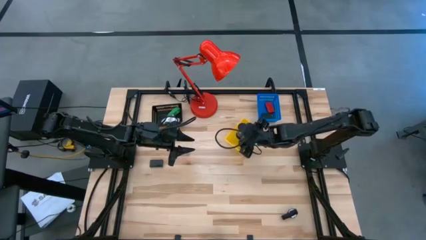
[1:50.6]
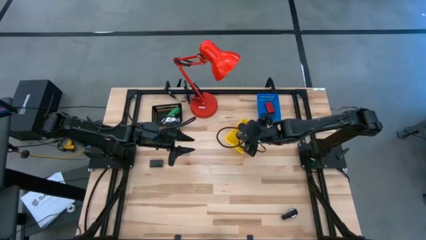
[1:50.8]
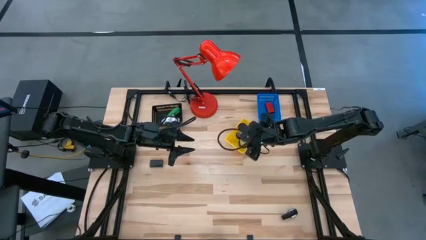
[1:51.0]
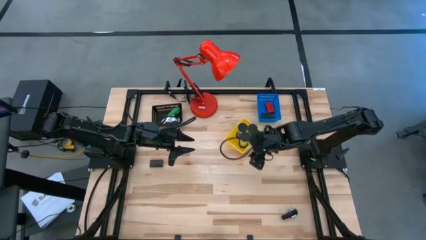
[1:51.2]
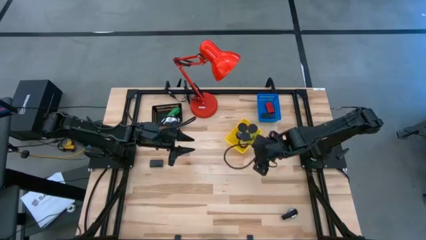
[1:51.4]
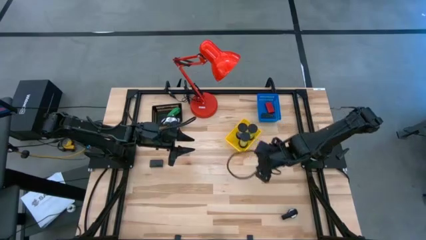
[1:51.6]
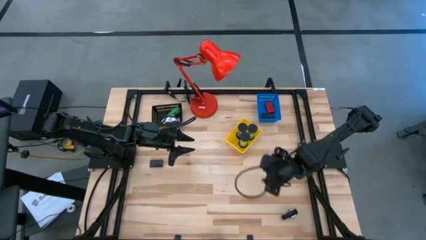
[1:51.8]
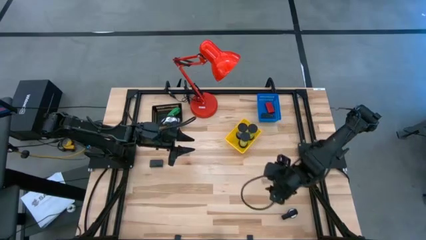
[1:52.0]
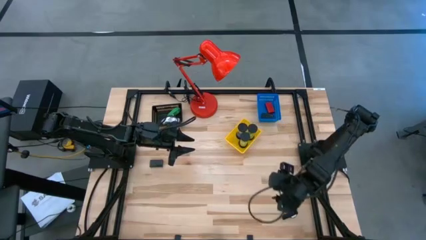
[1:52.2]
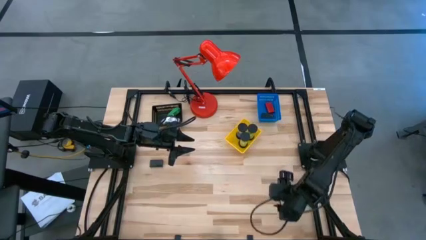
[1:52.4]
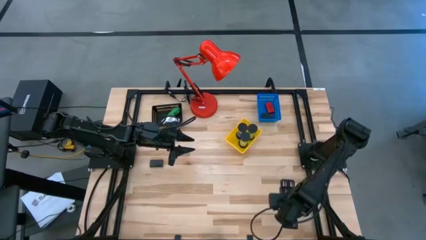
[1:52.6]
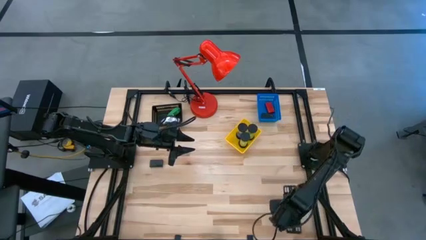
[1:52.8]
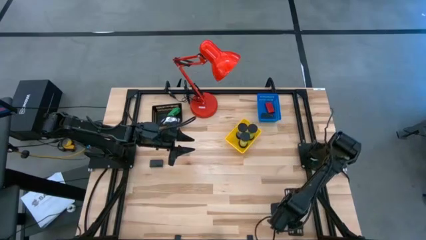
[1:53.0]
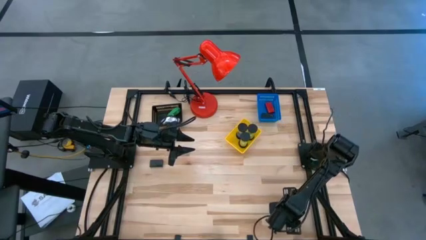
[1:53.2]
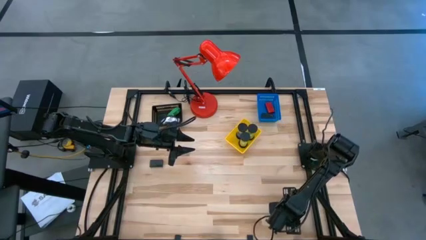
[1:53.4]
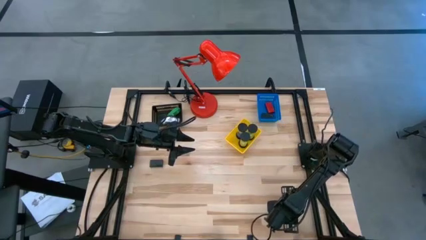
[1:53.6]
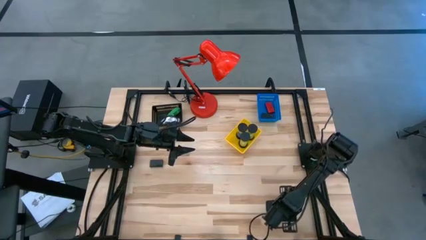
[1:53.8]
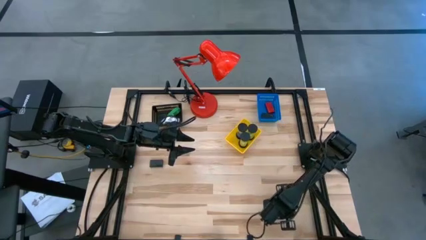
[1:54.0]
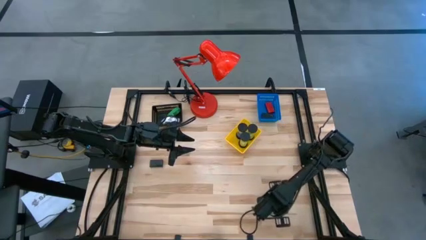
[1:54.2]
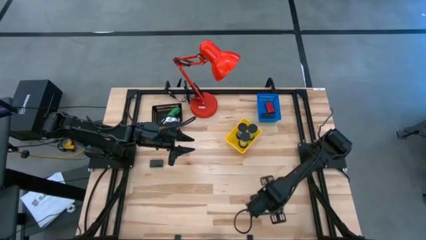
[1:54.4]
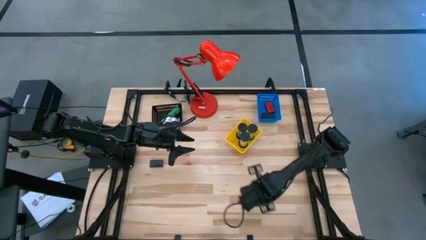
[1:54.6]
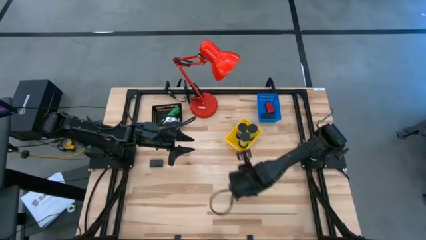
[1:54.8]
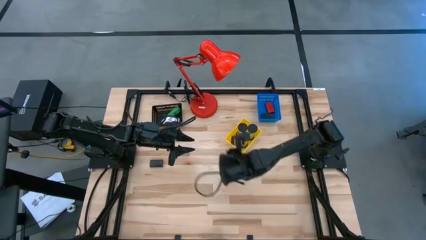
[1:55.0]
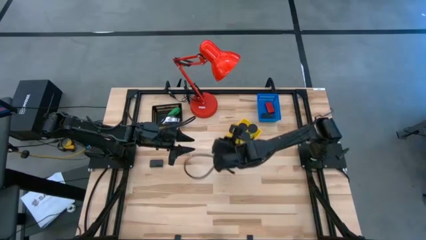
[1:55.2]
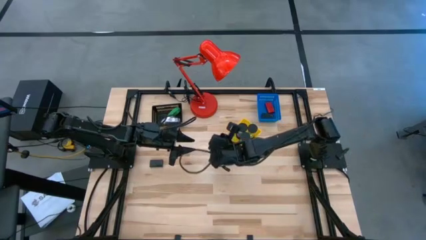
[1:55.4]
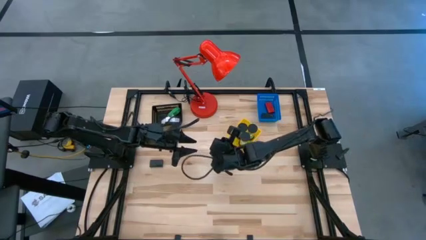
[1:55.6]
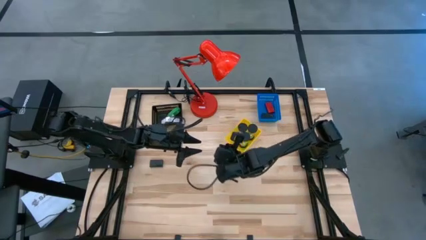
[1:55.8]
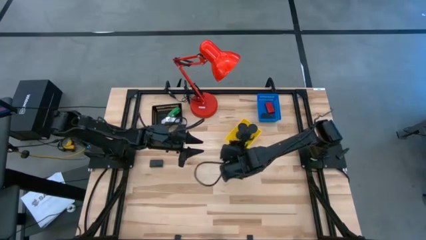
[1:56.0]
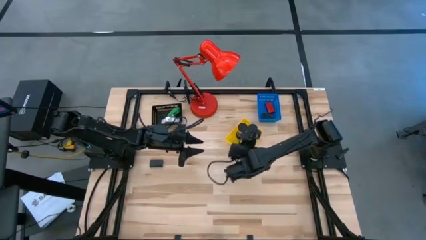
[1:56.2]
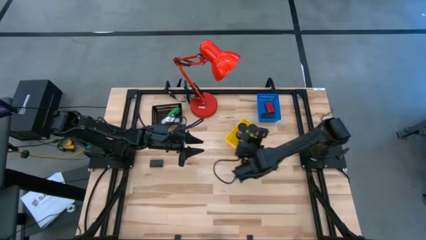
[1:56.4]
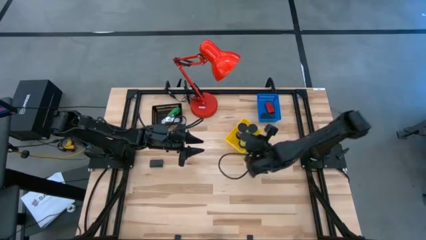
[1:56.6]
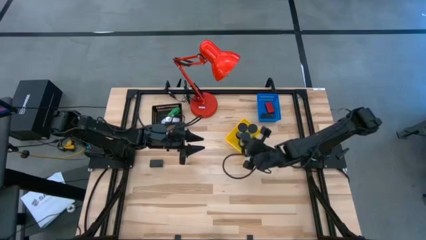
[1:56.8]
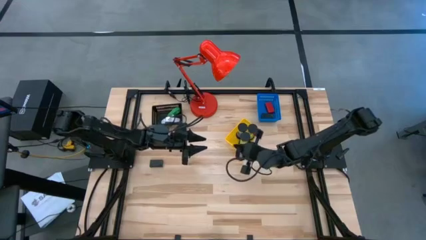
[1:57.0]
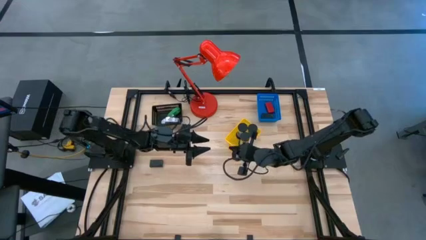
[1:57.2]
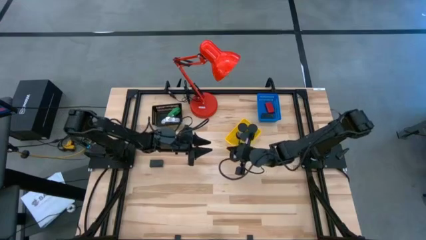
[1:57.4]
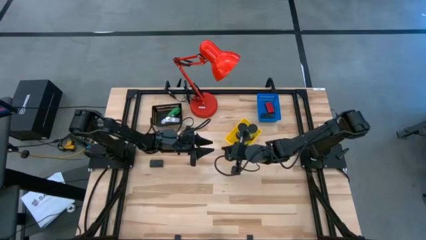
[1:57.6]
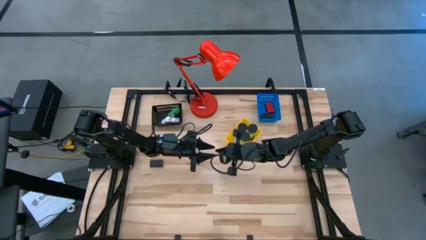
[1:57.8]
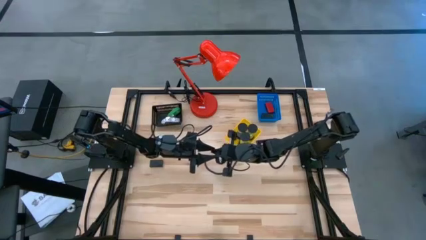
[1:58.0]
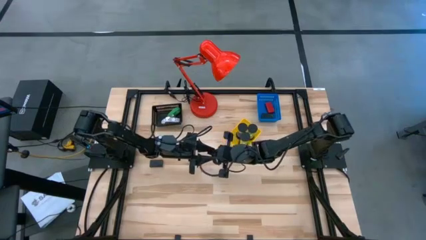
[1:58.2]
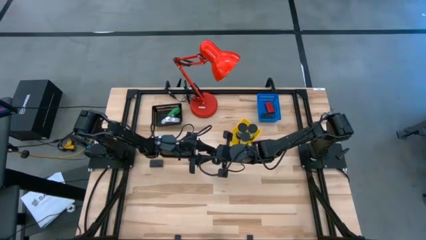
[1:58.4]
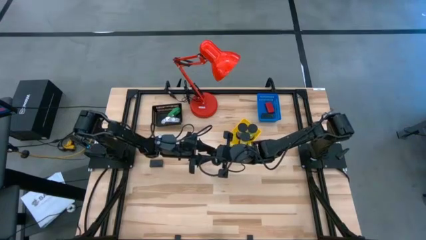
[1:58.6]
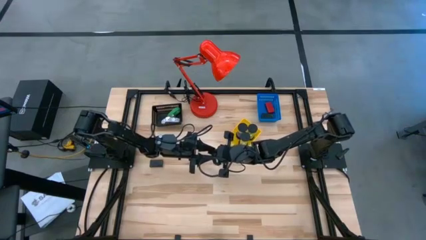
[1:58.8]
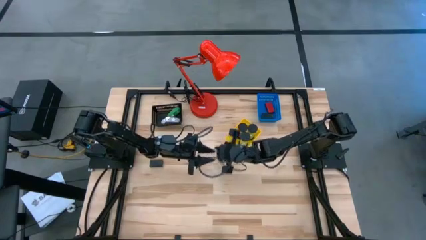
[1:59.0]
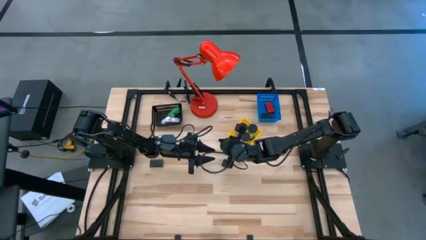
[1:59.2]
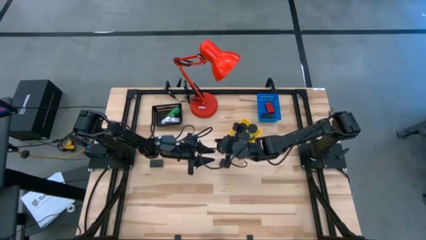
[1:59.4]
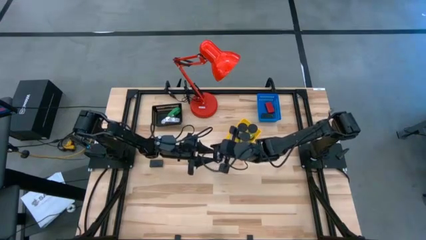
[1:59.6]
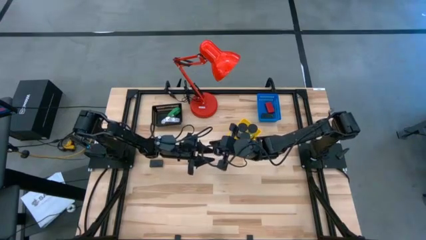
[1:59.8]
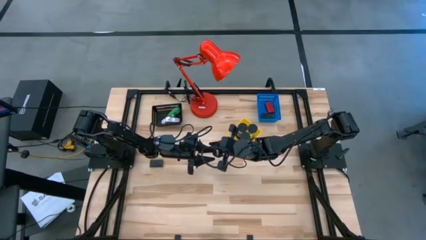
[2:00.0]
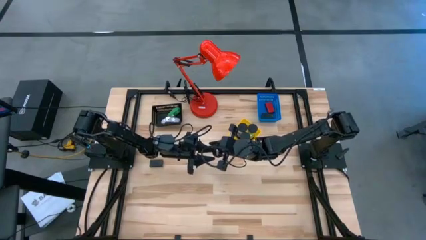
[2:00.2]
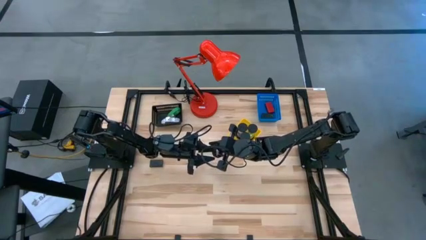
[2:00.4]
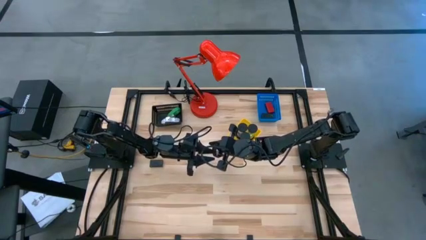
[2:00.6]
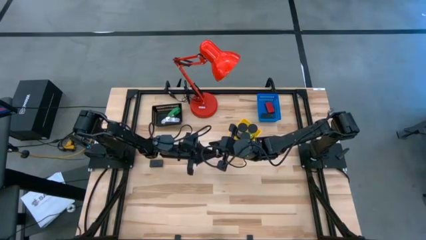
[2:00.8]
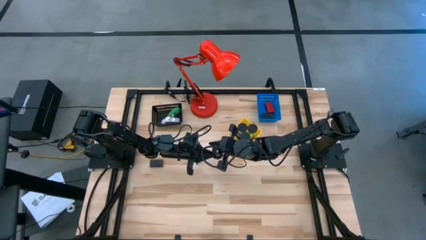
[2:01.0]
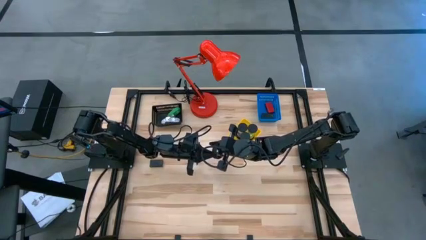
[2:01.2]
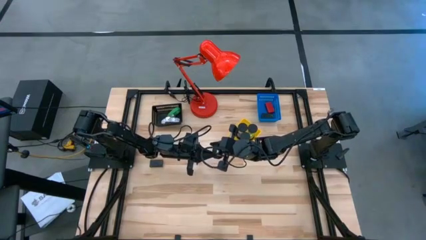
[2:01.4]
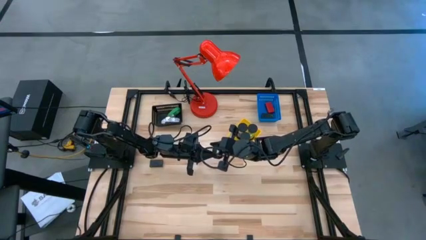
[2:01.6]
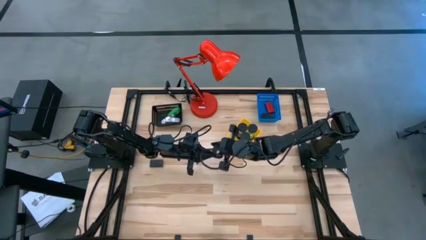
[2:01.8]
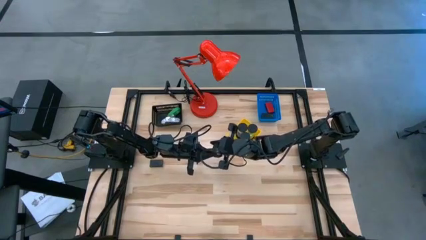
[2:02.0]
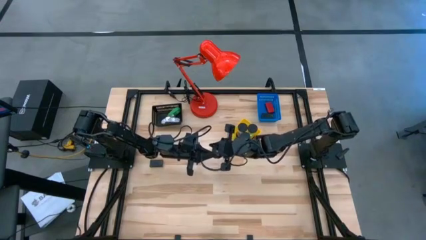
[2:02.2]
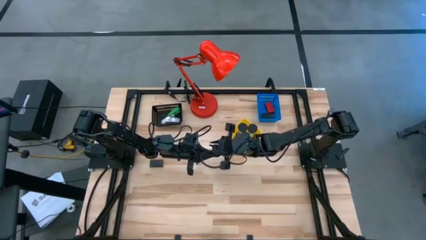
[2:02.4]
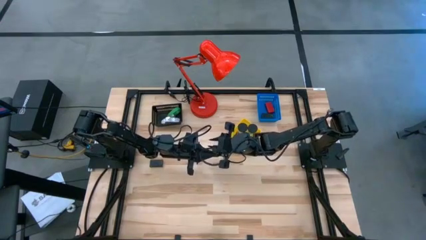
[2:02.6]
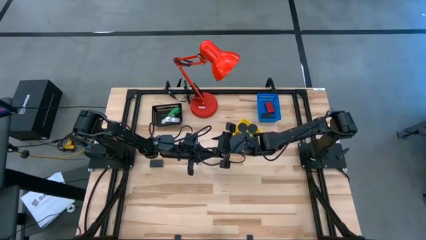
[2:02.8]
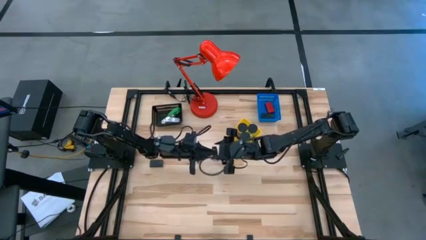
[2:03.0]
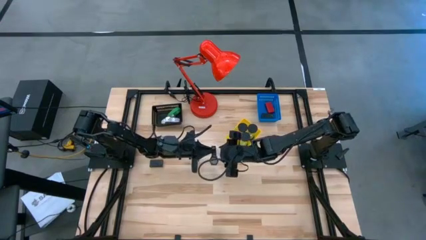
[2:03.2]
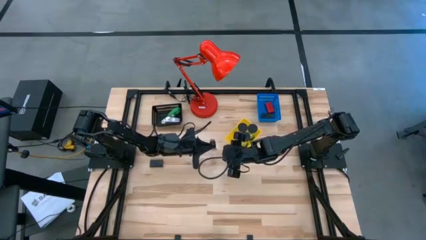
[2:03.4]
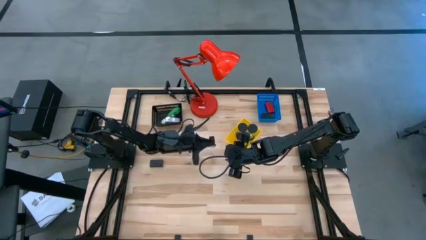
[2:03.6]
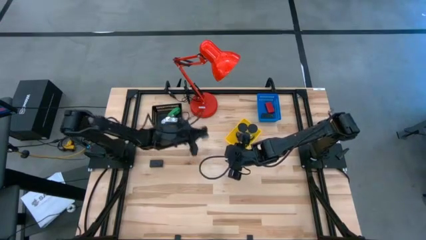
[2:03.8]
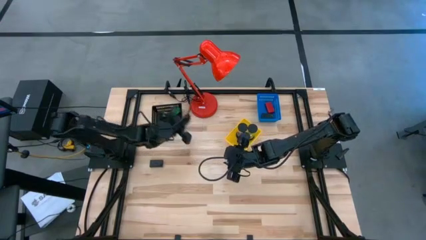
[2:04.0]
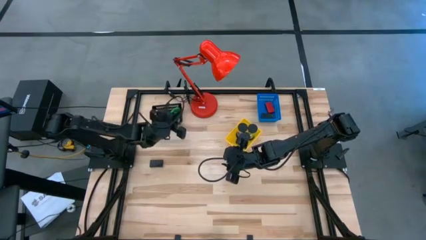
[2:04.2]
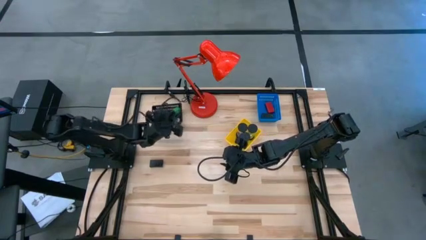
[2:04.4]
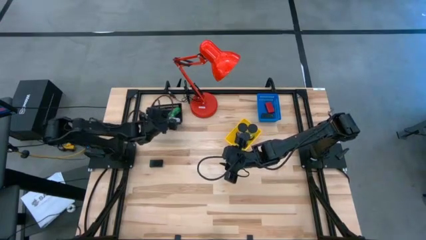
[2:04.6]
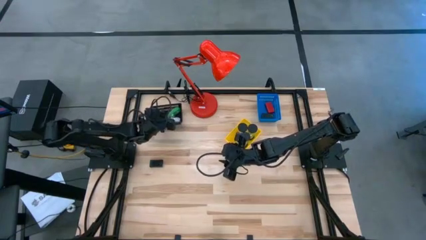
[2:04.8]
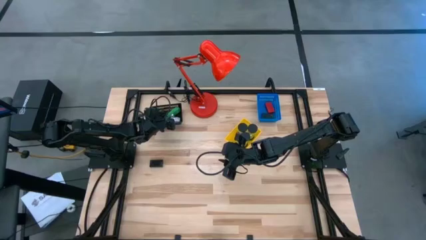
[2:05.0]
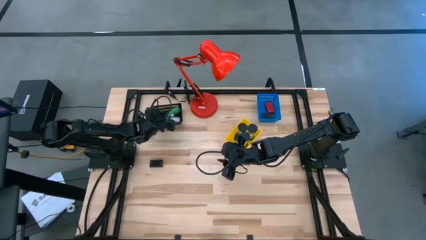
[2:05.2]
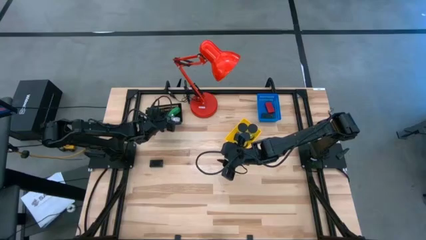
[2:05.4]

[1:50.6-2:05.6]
Task: Pick & Place Office items
Put the black wrist watch into the black bin
